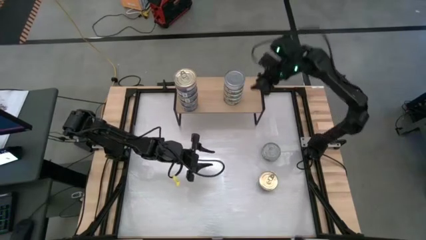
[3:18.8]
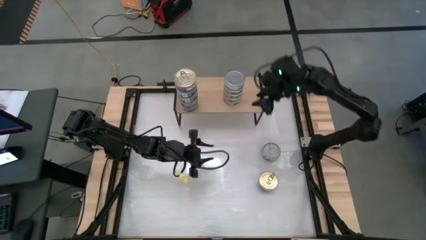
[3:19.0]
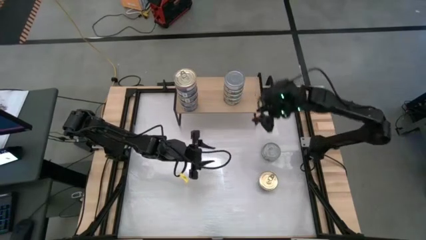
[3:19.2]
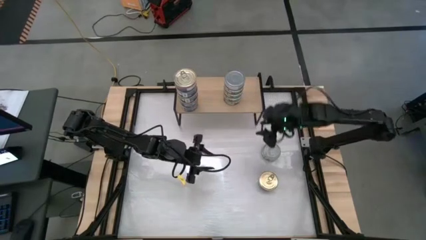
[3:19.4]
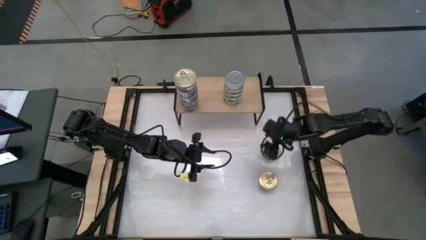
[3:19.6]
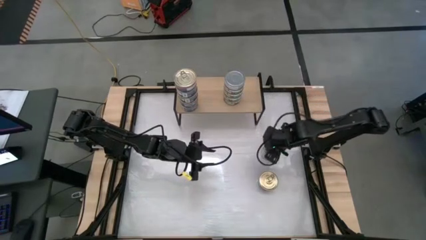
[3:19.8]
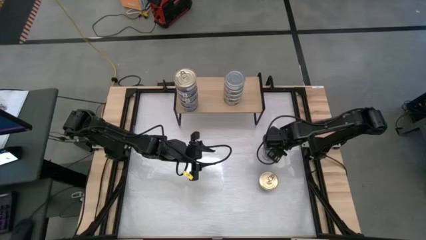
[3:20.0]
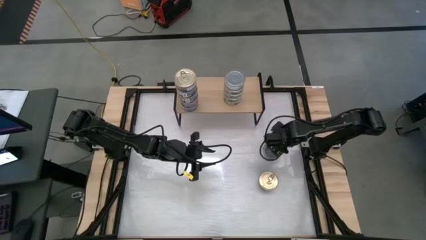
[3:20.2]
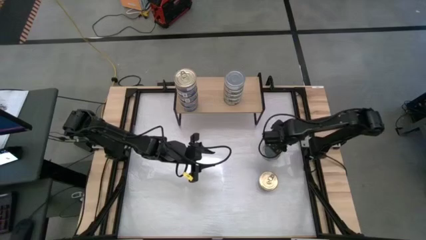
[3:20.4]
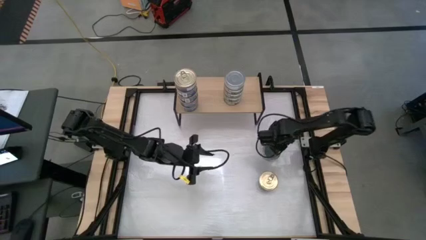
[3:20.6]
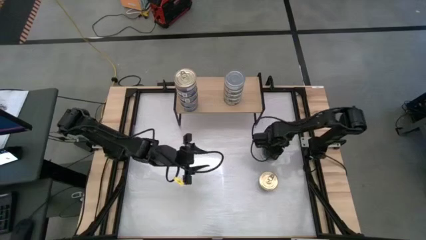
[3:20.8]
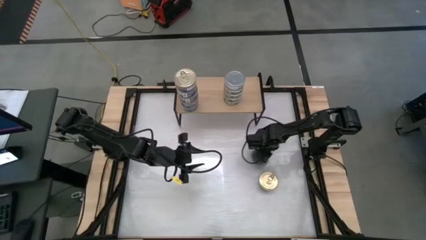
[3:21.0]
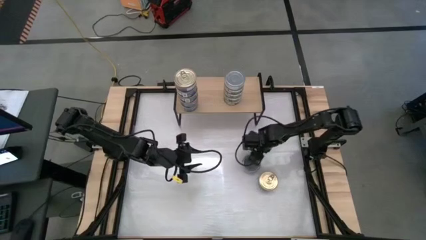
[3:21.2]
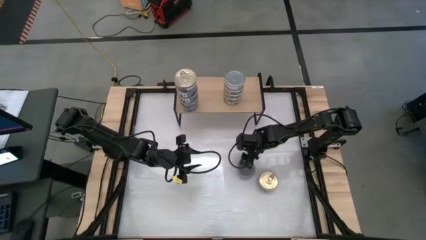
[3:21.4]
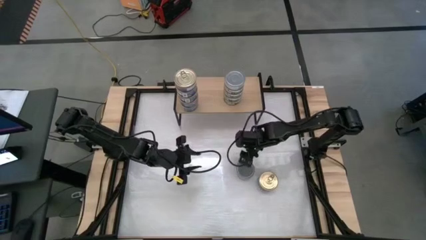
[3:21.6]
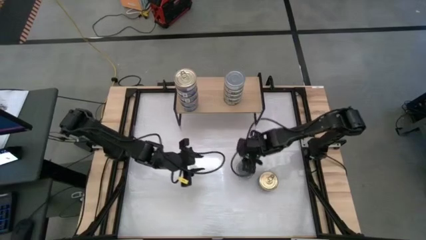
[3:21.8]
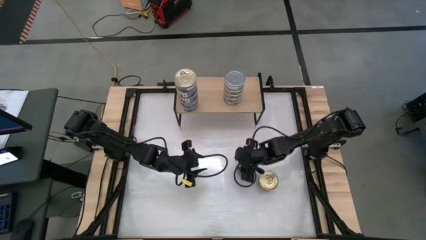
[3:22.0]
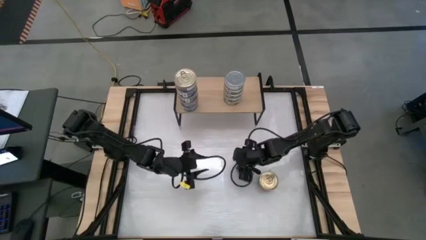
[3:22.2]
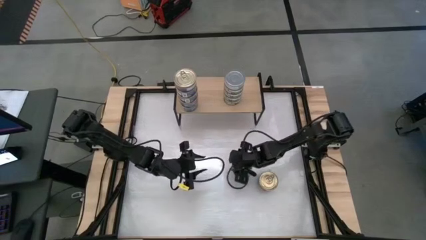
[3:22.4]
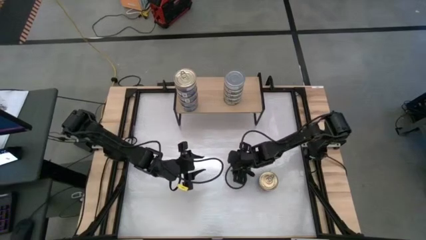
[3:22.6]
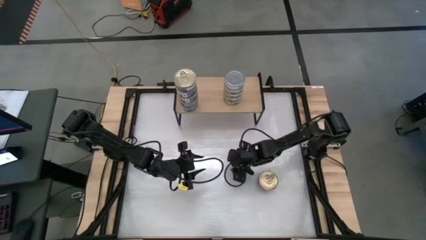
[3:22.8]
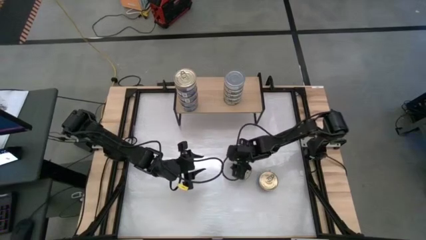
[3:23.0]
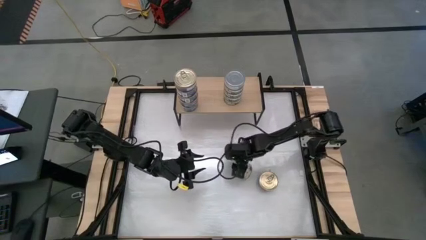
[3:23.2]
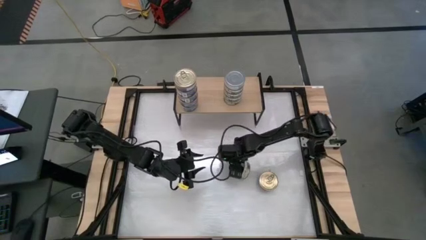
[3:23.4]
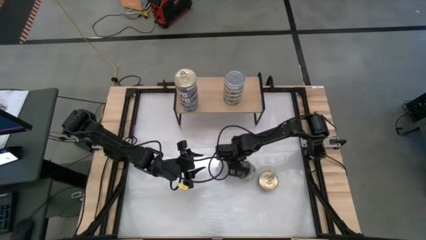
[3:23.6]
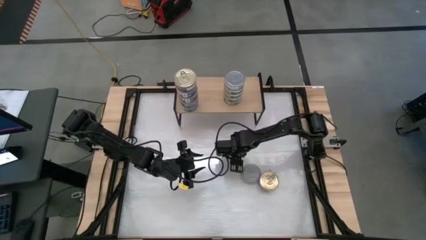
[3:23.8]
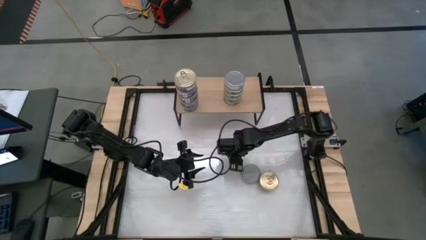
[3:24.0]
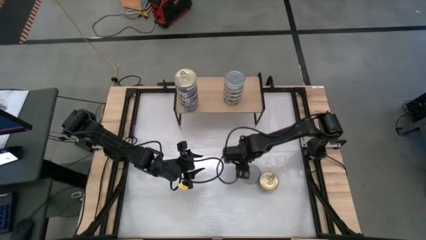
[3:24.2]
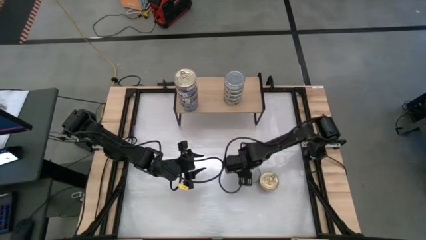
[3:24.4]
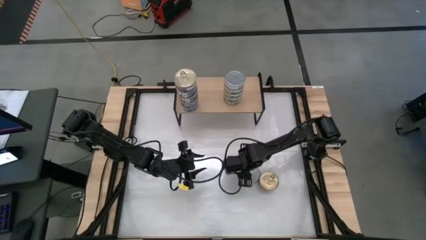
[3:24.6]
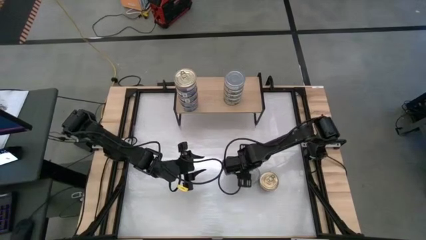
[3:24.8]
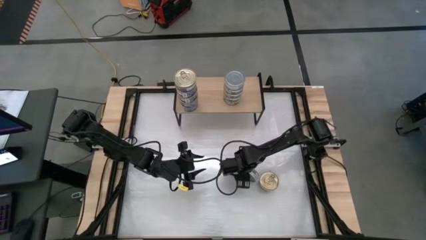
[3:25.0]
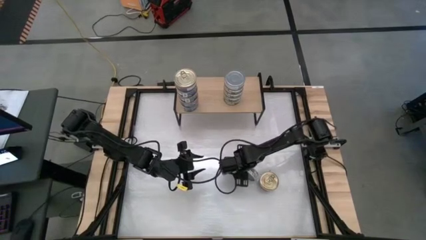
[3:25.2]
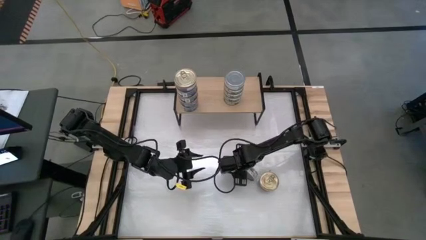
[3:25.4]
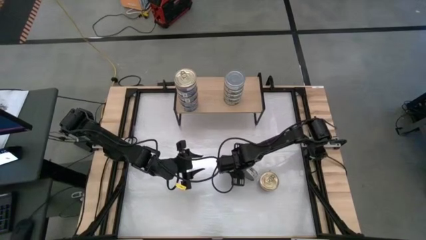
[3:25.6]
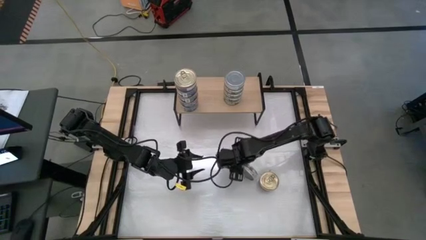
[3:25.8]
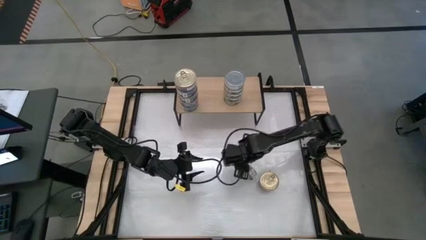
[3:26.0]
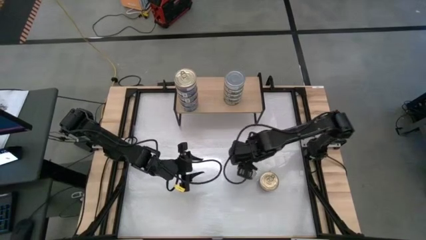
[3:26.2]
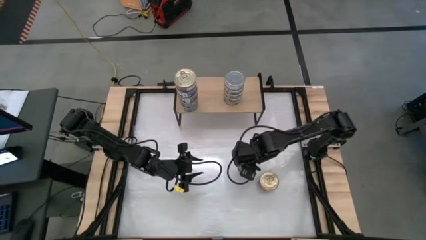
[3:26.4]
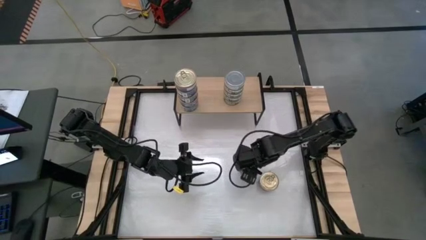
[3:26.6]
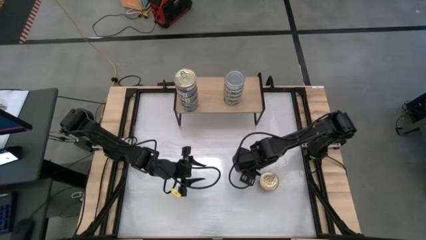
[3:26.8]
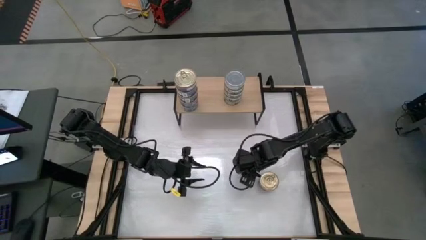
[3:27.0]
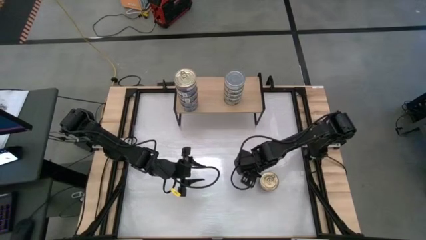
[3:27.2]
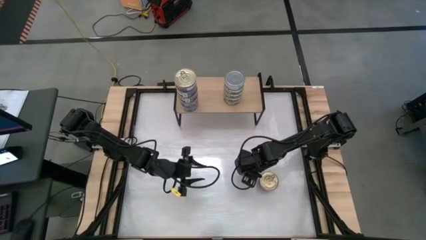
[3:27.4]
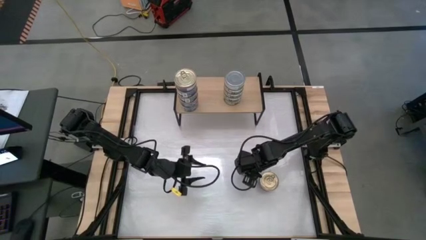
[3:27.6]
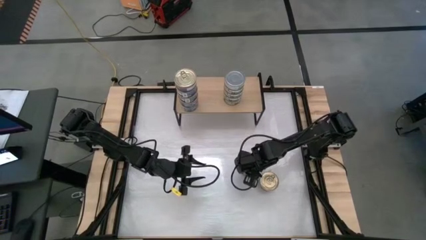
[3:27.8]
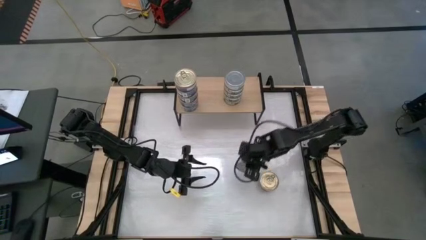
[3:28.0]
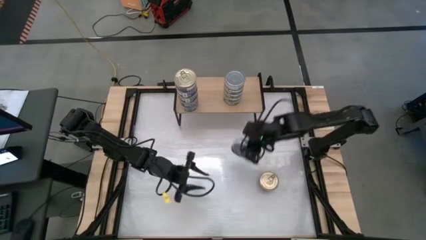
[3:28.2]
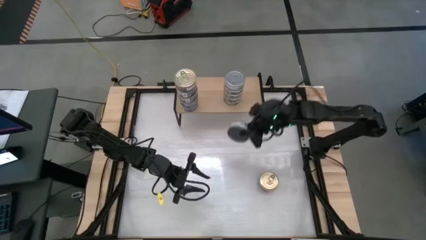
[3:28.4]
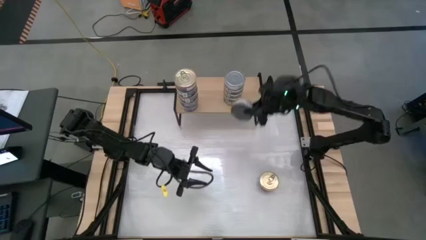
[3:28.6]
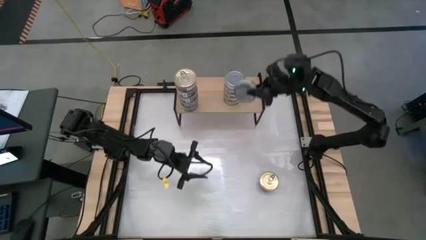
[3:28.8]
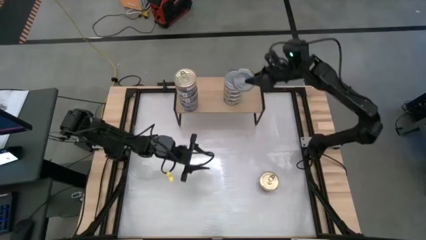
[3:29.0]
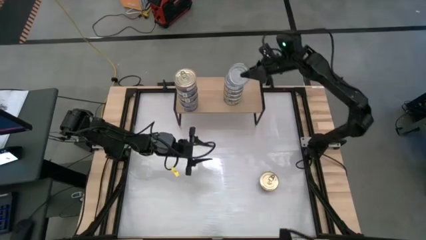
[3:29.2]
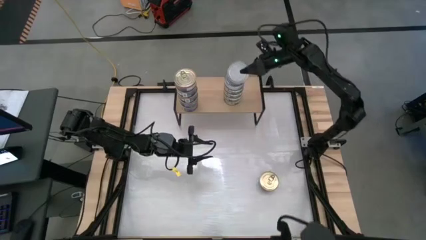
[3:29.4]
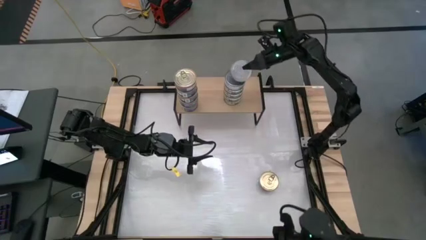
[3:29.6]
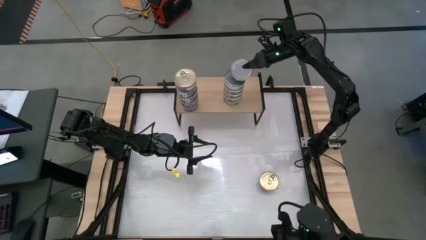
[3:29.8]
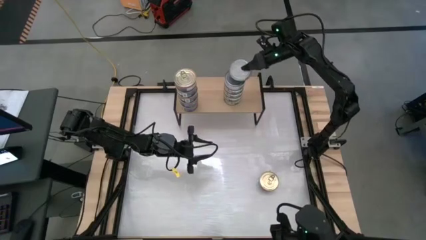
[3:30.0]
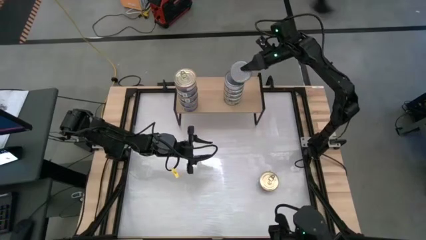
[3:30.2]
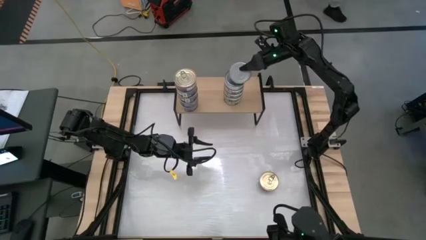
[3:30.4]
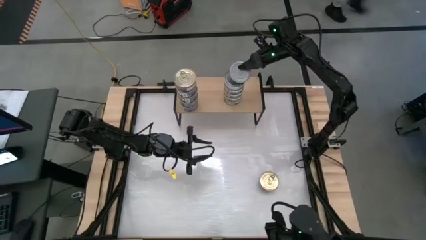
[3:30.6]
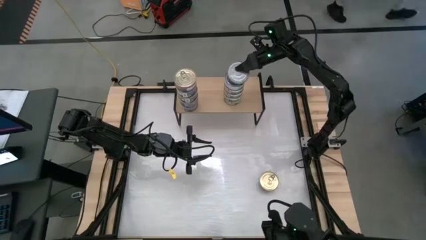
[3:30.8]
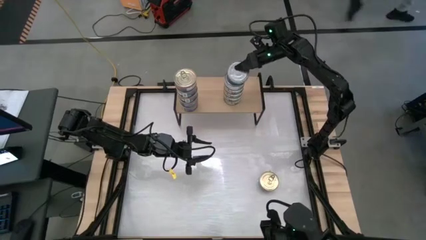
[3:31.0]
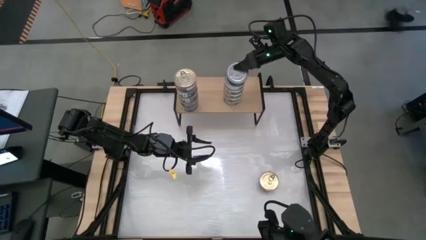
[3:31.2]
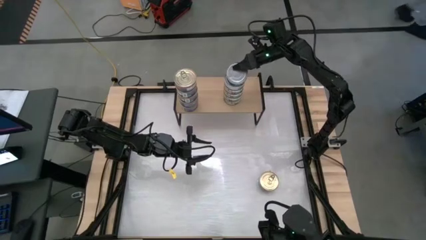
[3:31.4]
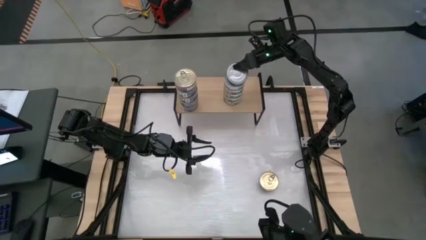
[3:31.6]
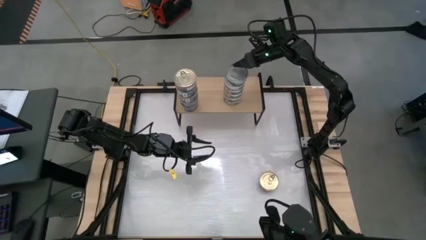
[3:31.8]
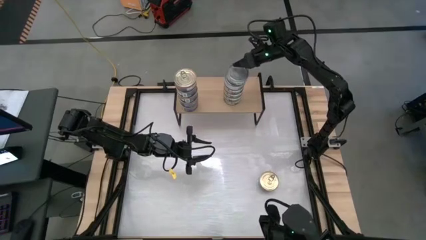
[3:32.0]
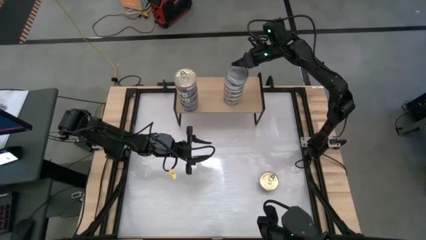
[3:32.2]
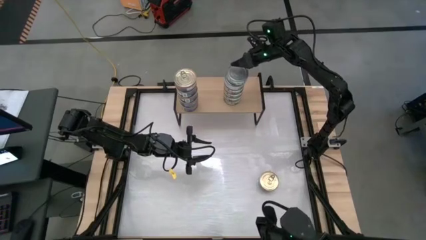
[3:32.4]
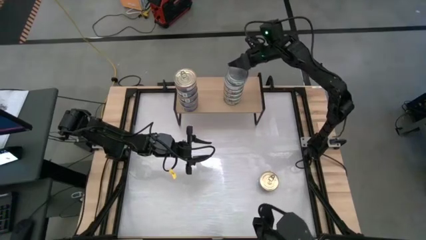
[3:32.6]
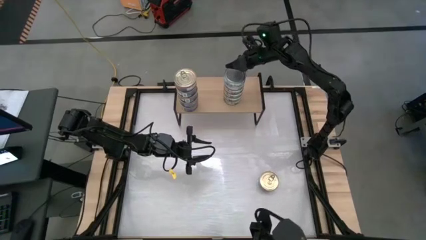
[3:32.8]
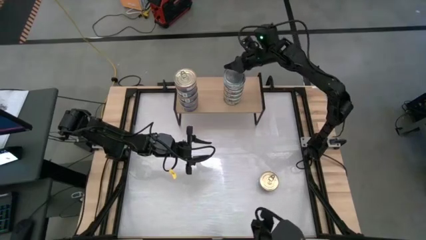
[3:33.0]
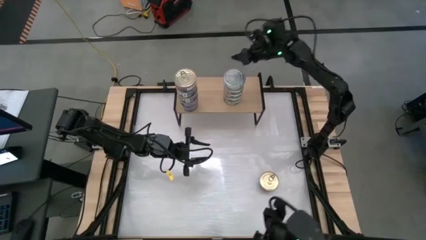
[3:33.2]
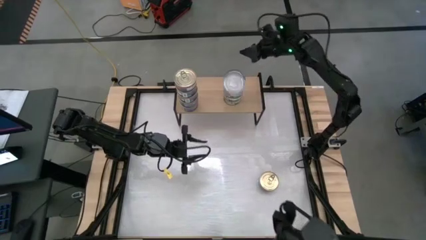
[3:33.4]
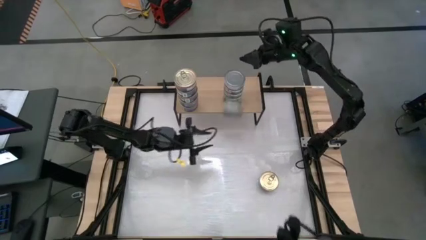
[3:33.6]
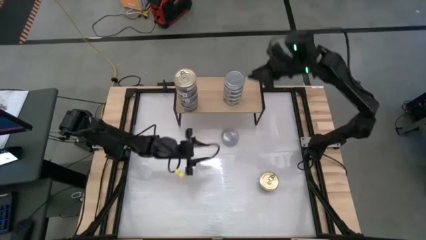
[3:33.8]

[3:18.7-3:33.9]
Task: Stack canned seafood by type on shelf
Stack the green tuna can on top of the other green tuna cans on the shelf

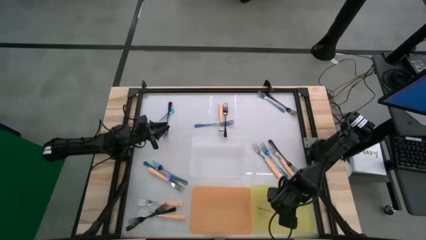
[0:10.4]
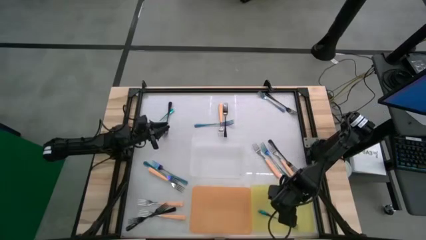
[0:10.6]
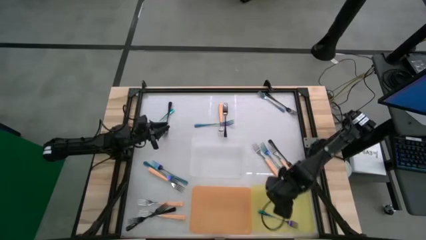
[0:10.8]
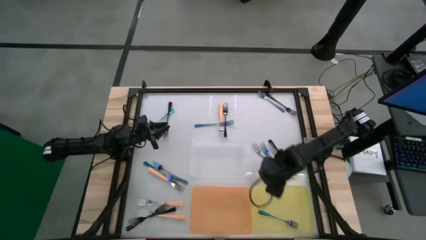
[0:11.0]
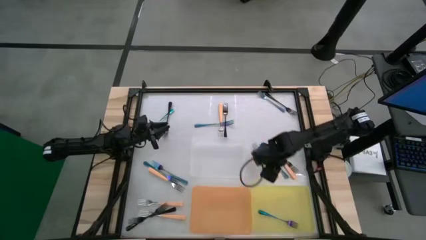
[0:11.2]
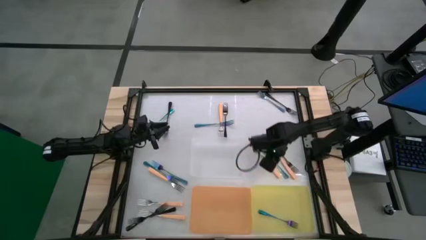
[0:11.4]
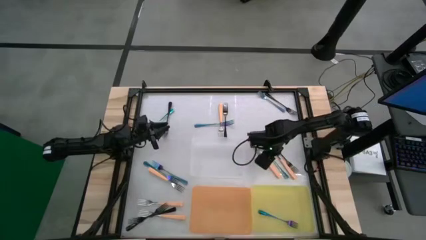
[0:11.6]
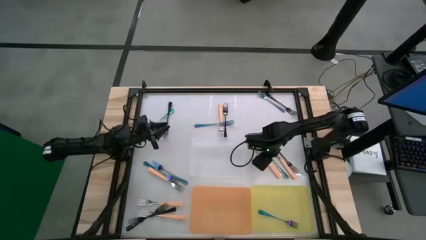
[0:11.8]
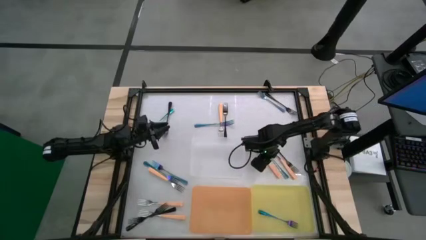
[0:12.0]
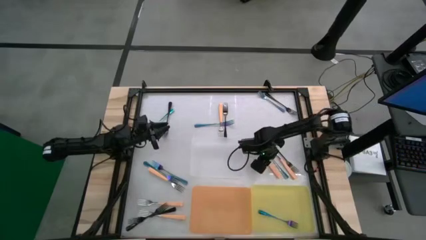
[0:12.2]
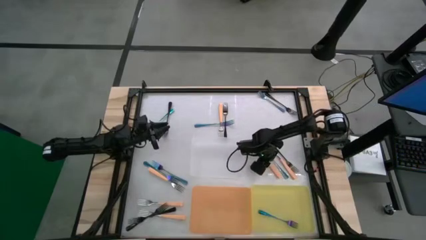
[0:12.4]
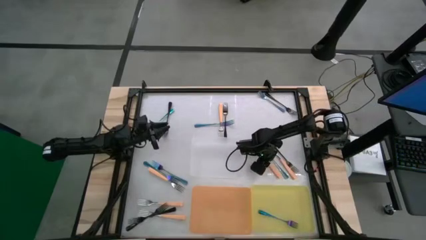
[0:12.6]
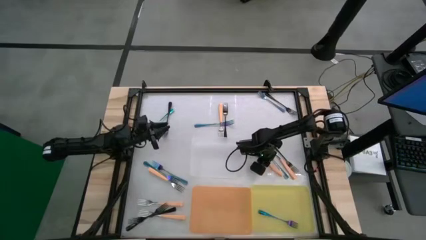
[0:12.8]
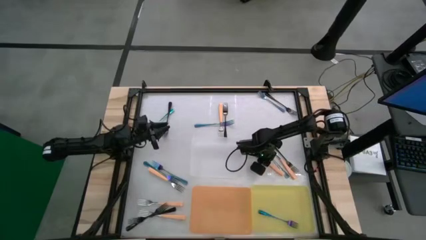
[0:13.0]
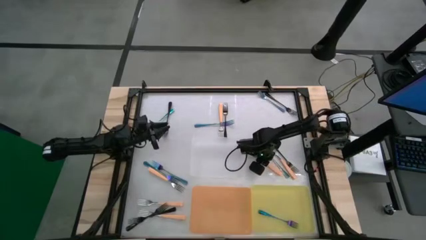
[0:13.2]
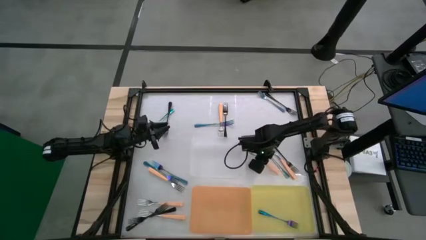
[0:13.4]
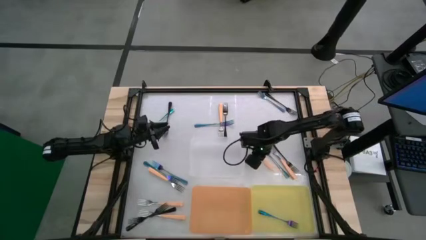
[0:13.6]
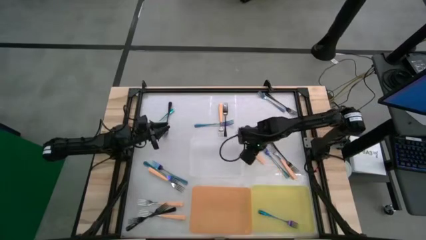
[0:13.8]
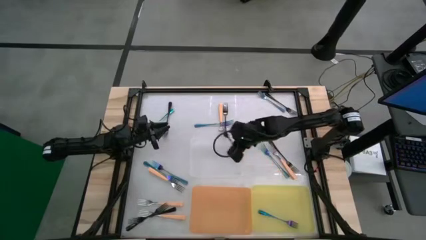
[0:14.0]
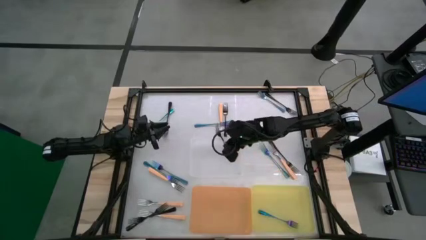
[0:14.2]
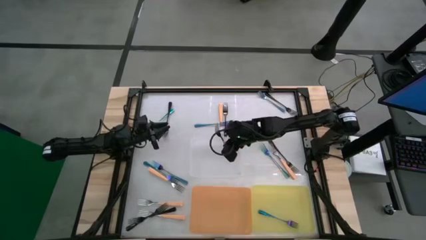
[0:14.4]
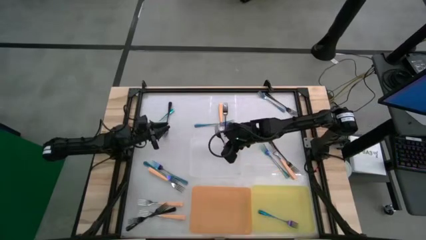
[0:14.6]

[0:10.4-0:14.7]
Task: Sort silverware by color (type)
Put the orange fork into the transparent bin
